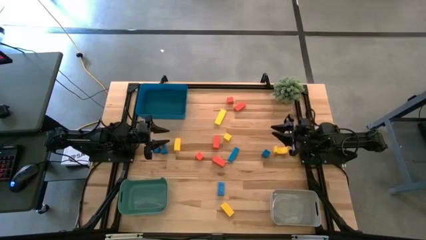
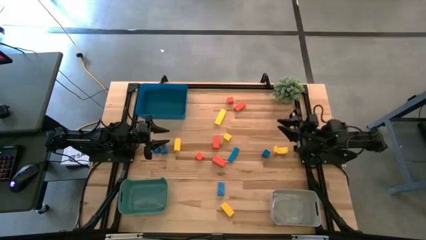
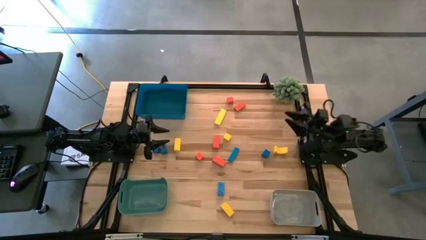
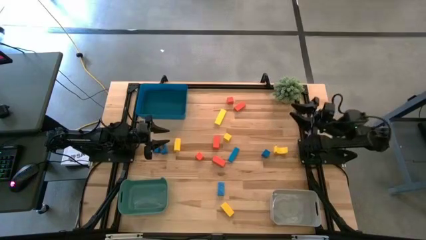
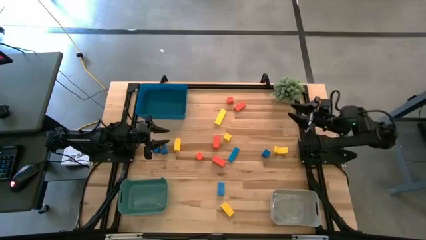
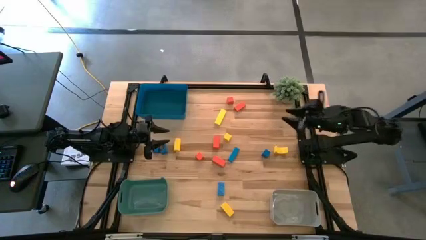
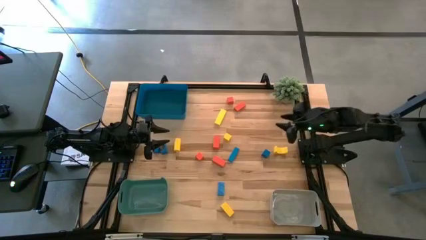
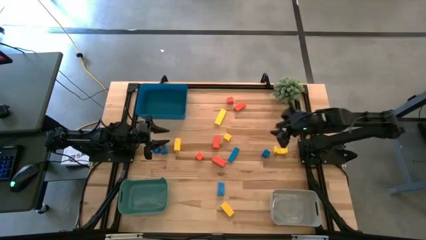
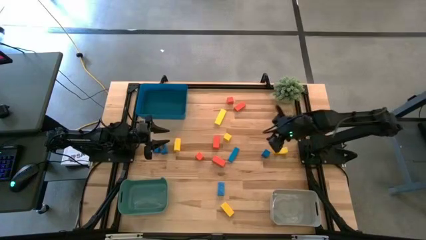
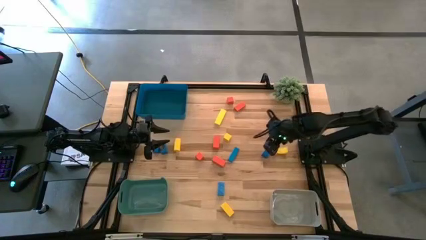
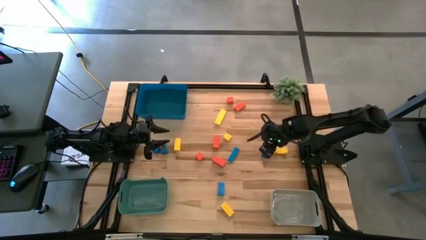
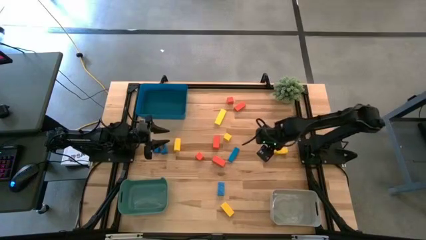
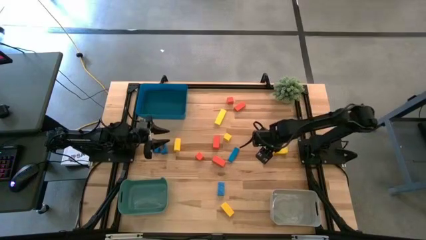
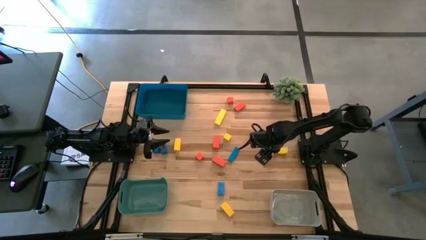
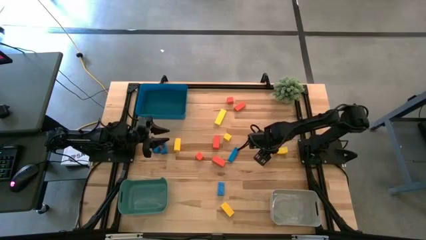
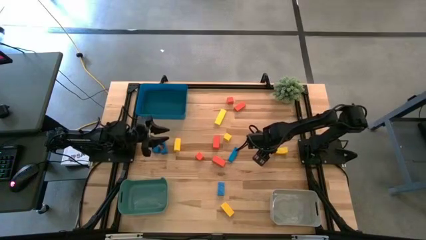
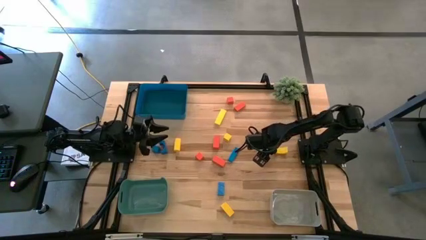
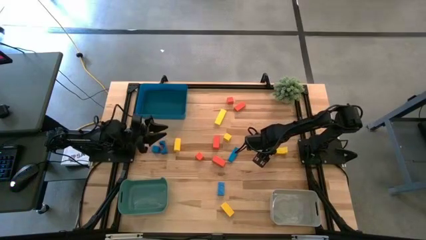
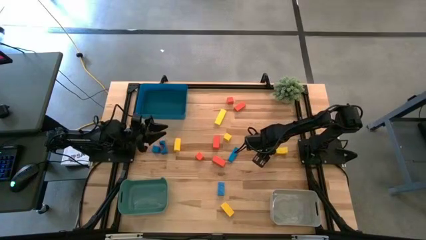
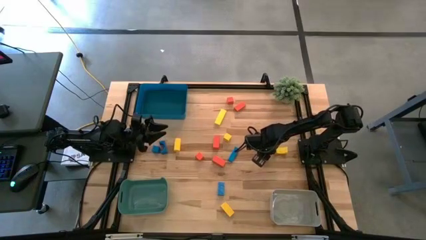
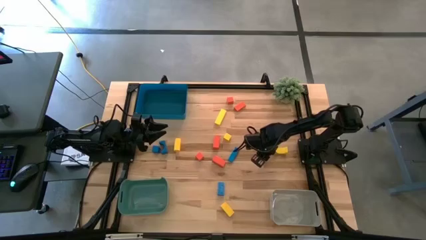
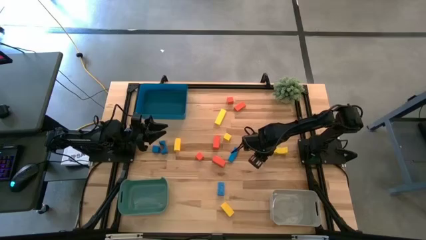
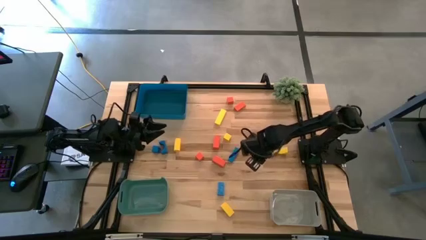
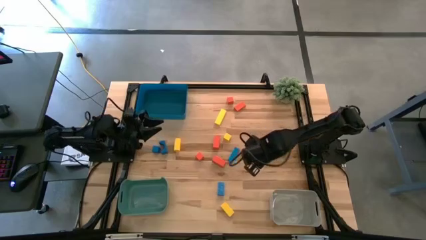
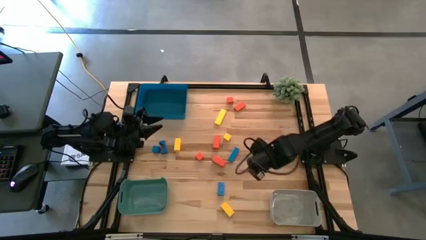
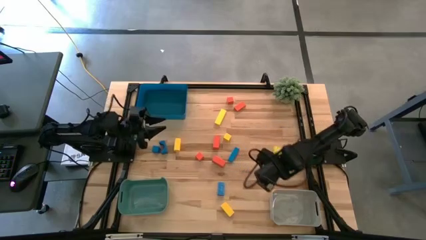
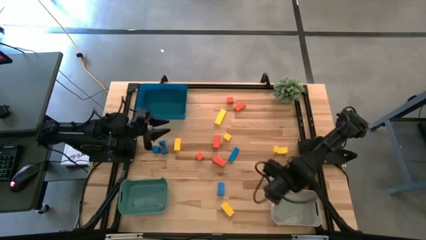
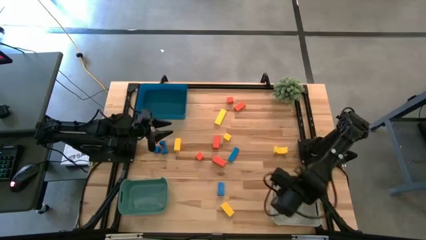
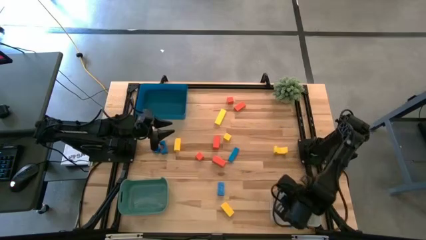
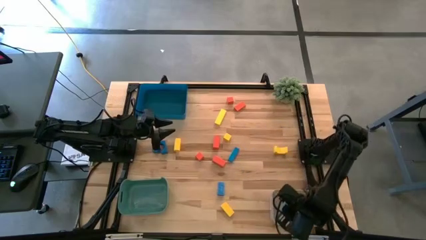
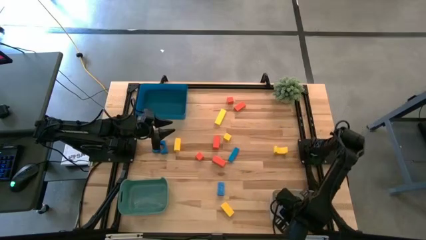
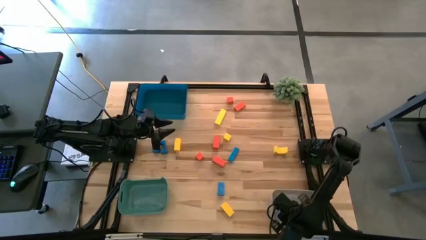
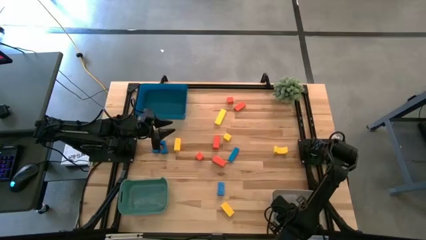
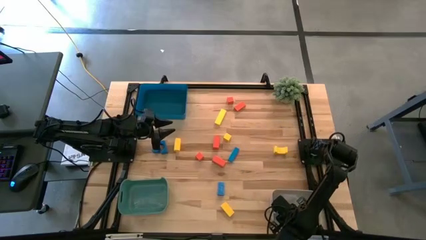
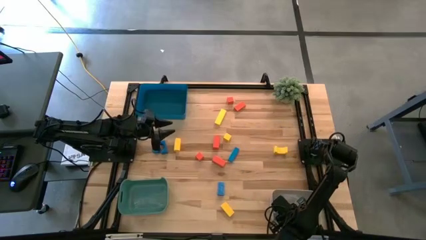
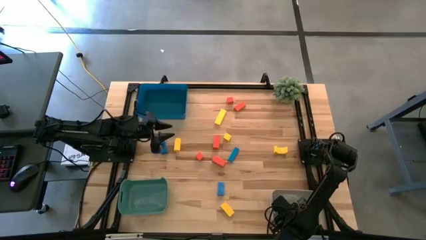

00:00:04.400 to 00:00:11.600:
Task: Sort & place blocks by color
Put the blue block into the white bin

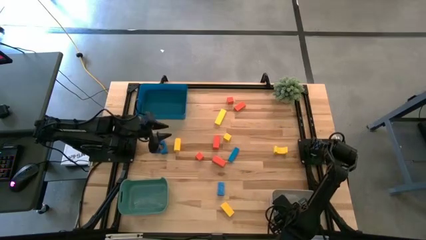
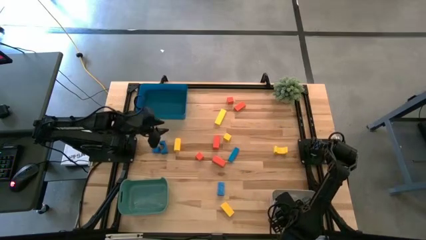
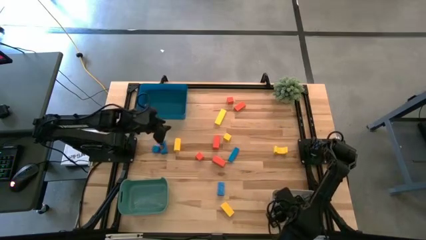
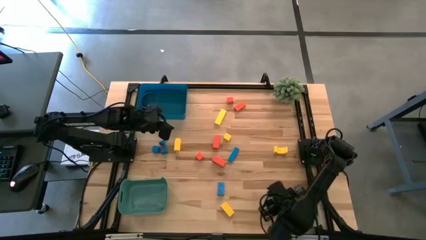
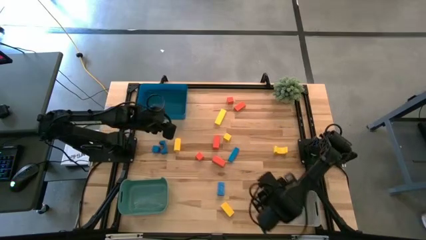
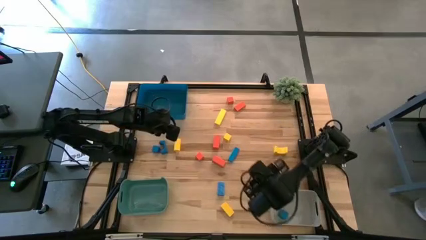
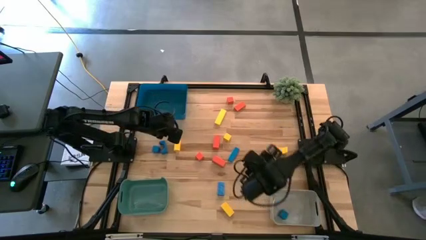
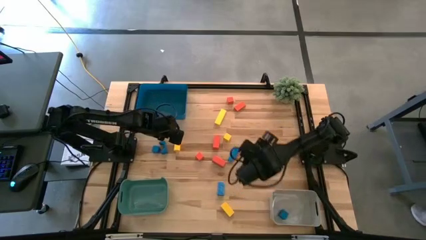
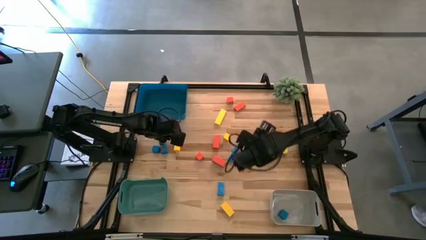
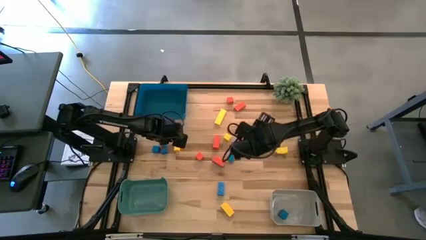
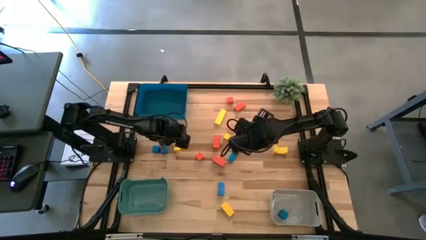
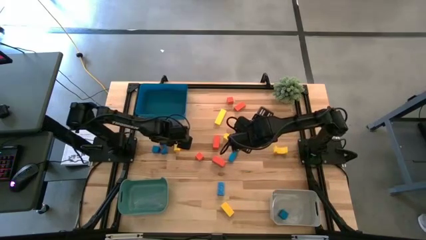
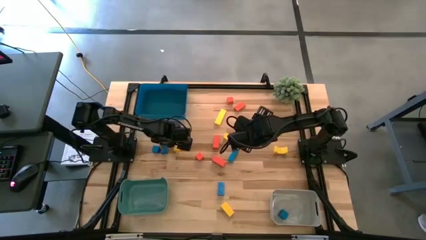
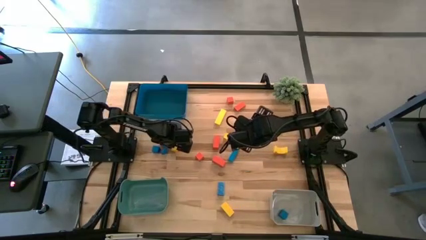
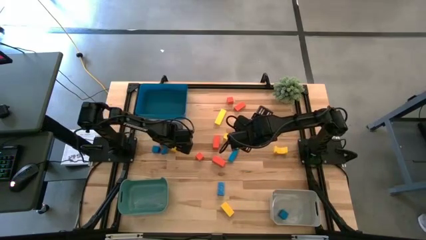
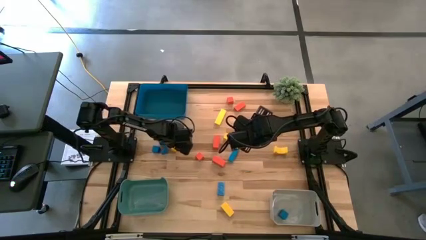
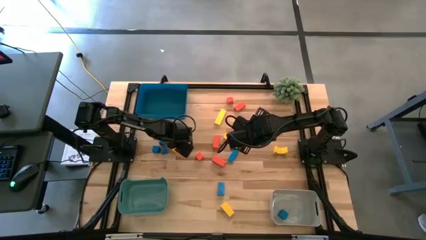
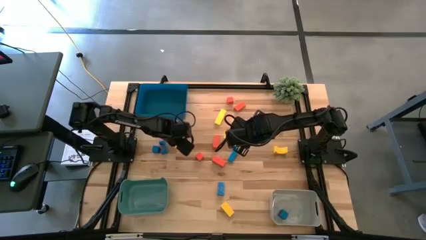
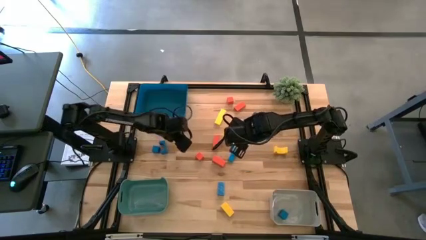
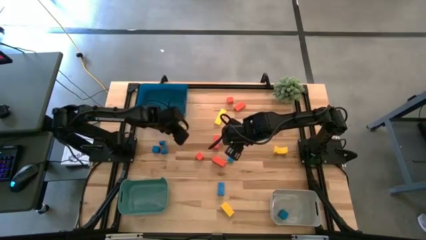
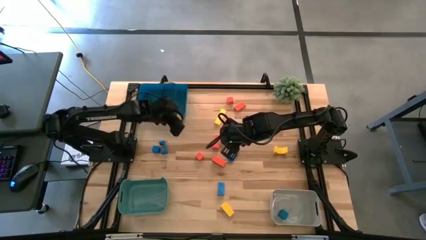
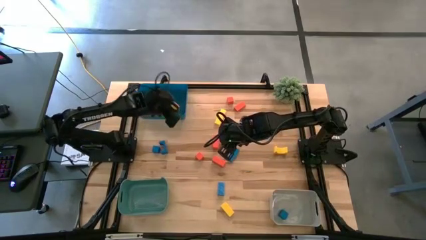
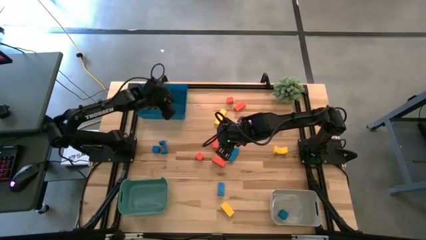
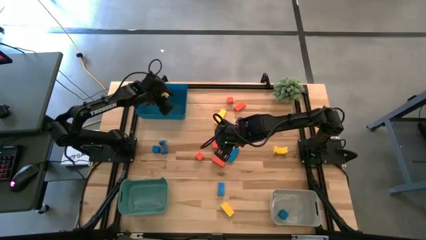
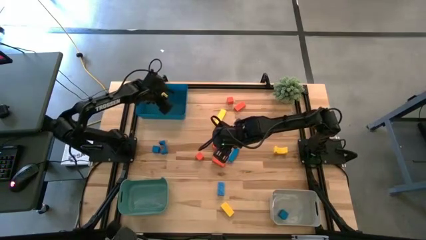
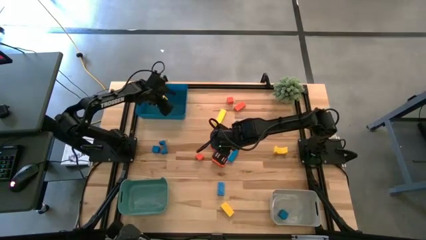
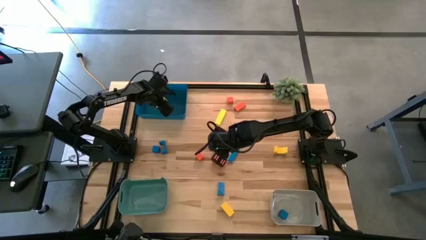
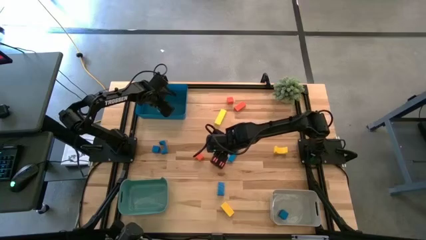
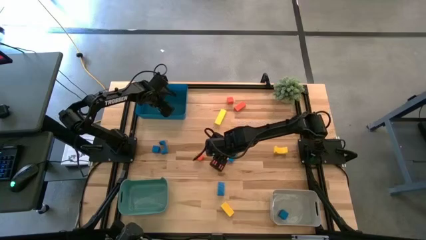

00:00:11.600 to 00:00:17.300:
Put the yellow block into the dark blue bin

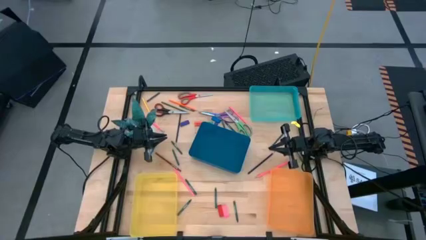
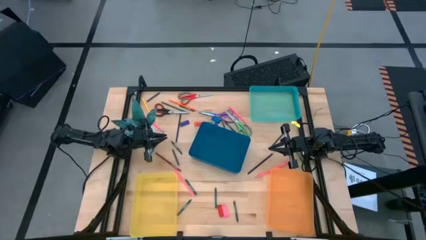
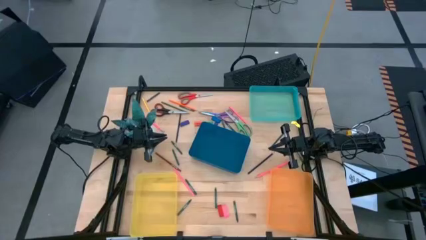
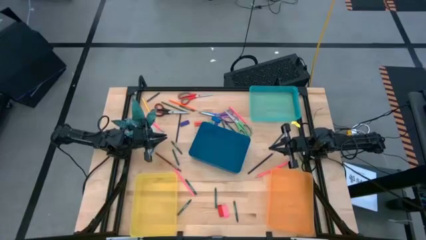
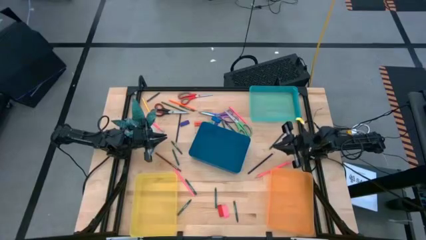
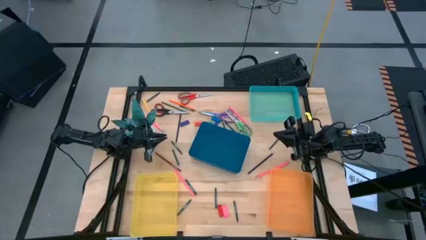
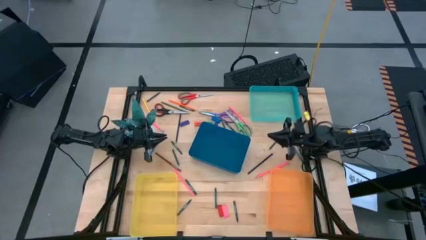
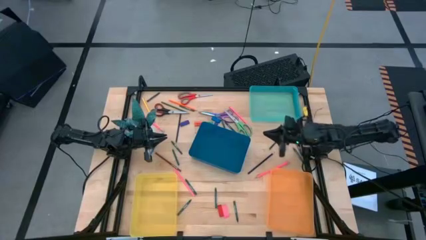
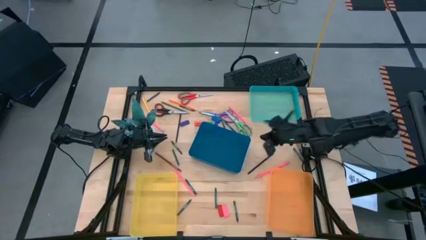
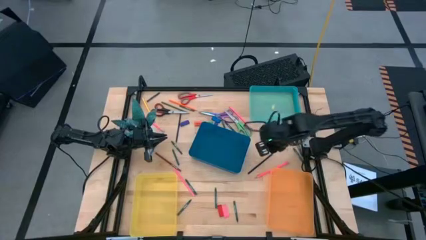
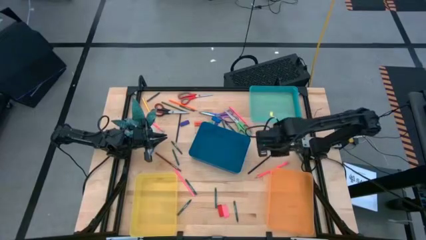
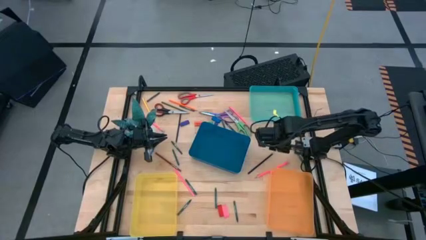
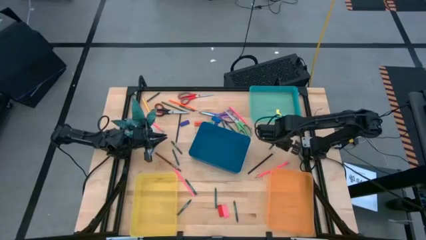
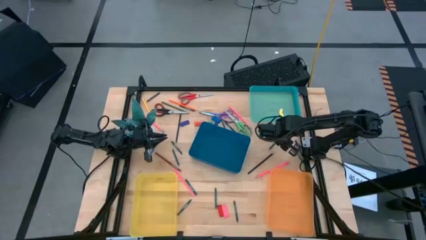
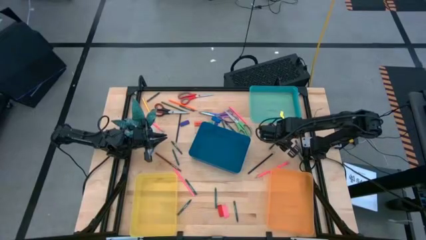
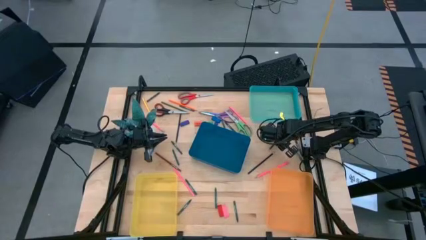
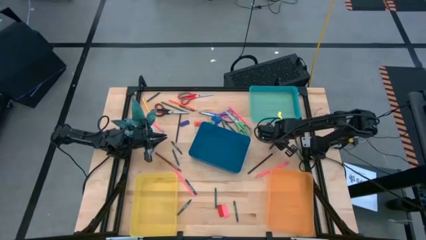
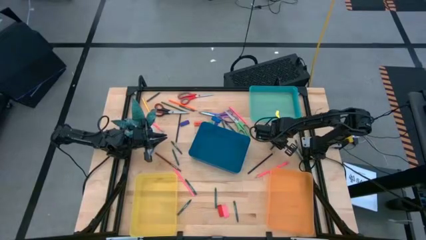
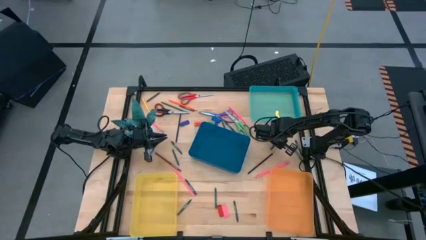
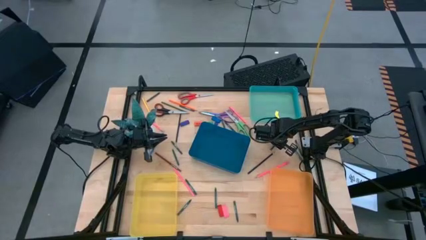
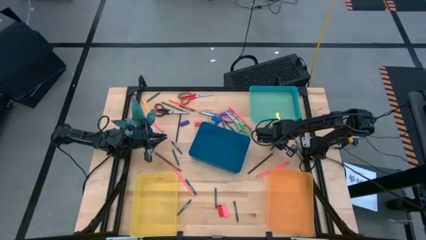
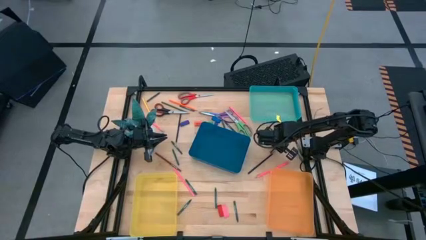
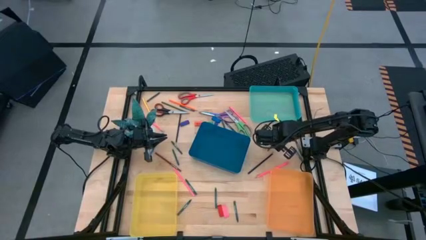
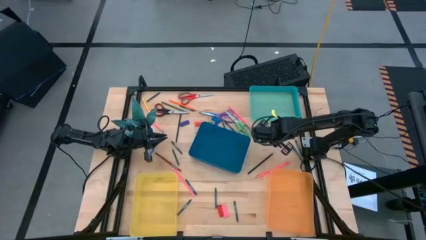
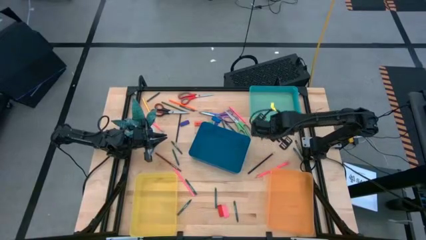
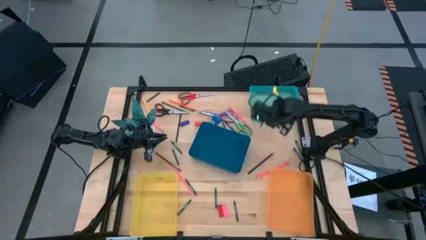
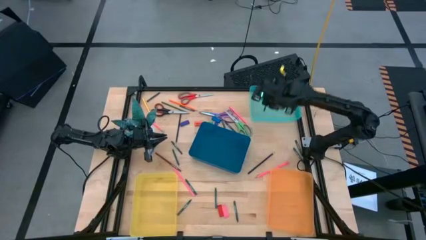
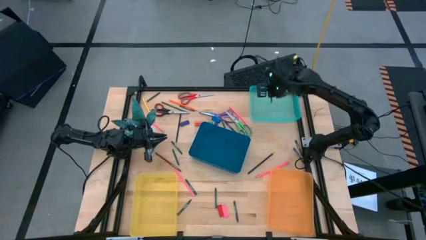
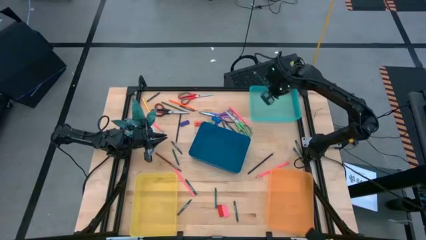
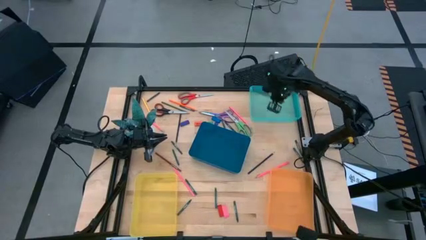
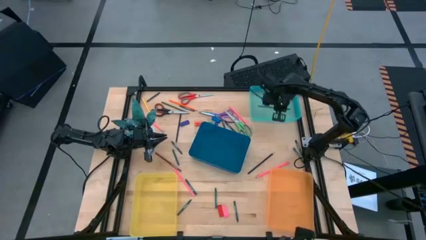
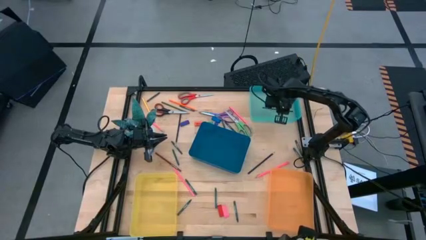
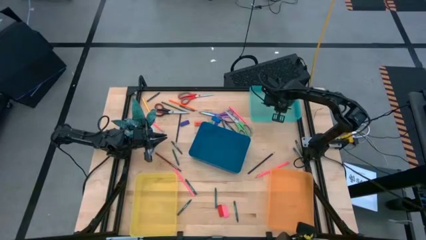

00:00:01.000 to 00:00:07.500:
Task: Sort crayons/erasers/pens/pencils in bins
Put the green pencil into the green bin
